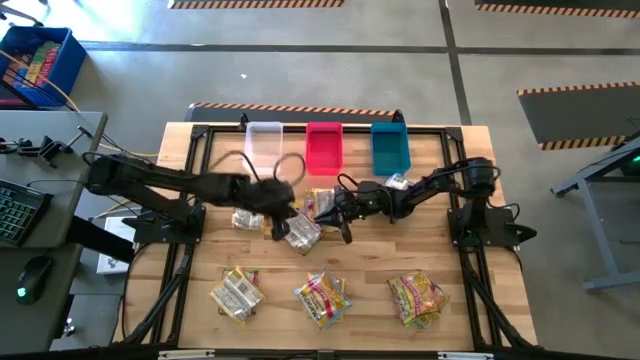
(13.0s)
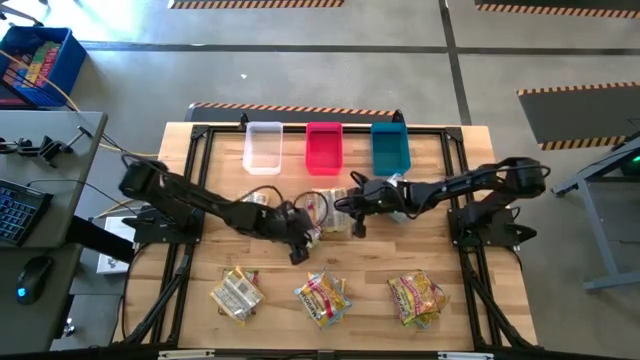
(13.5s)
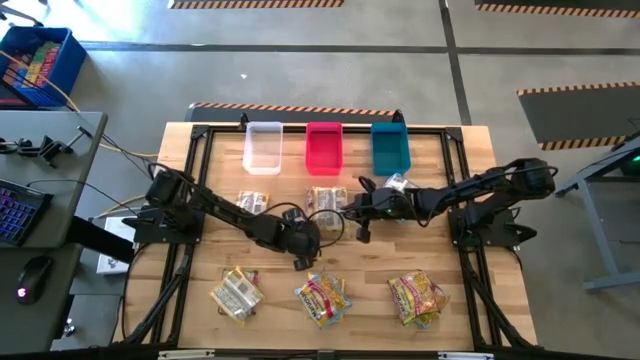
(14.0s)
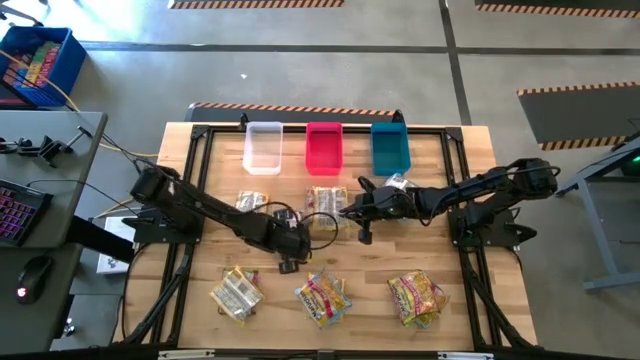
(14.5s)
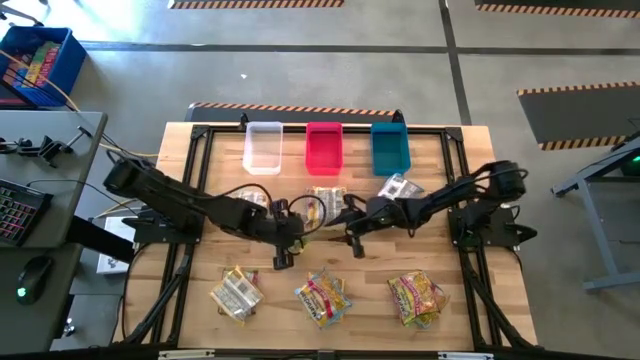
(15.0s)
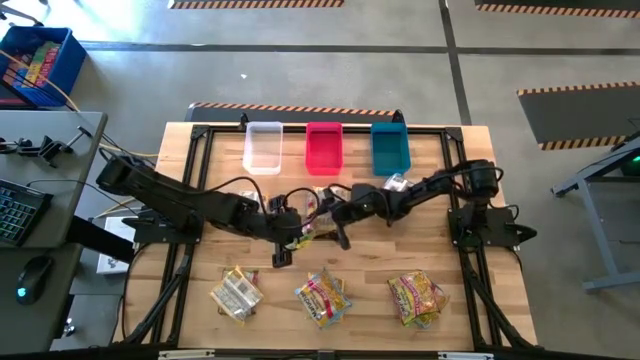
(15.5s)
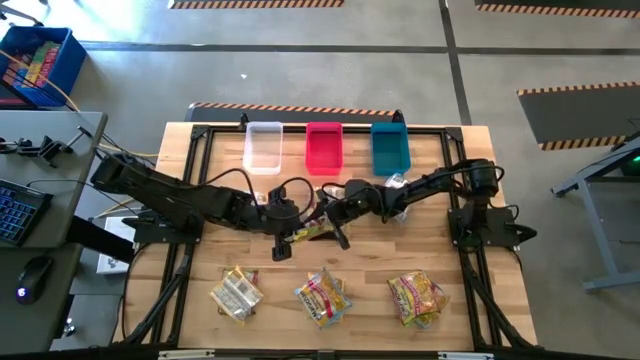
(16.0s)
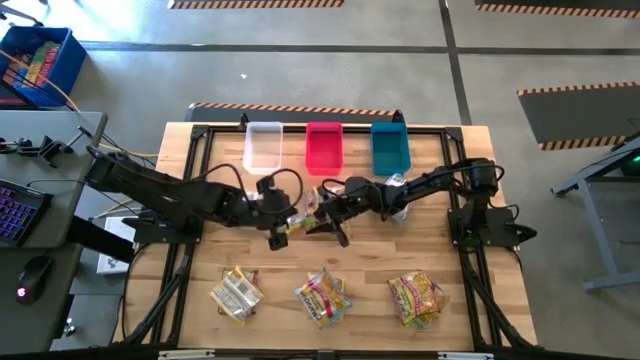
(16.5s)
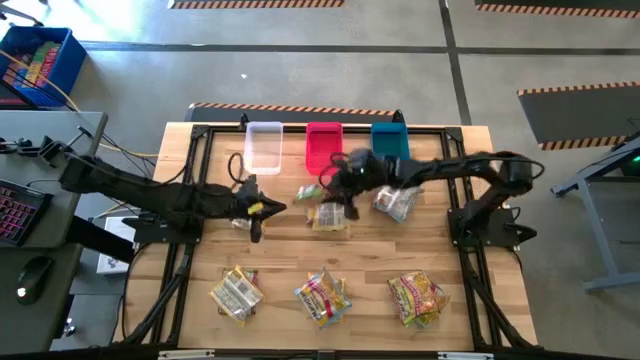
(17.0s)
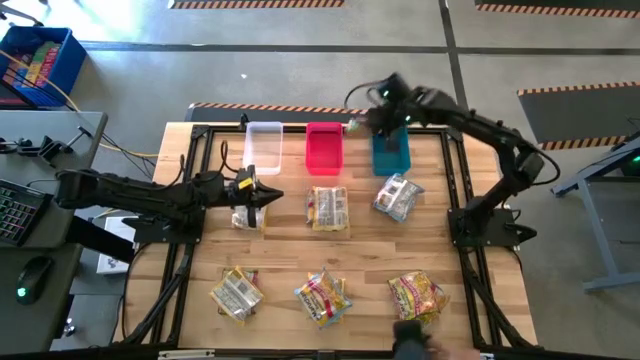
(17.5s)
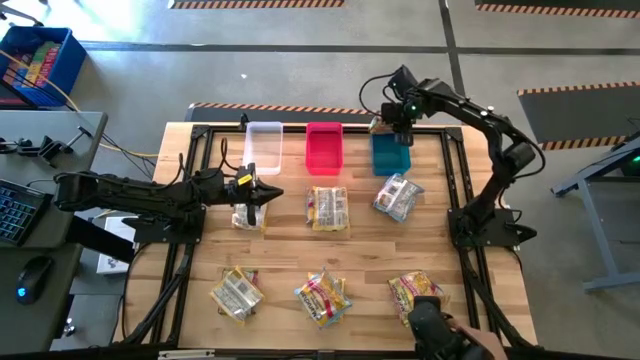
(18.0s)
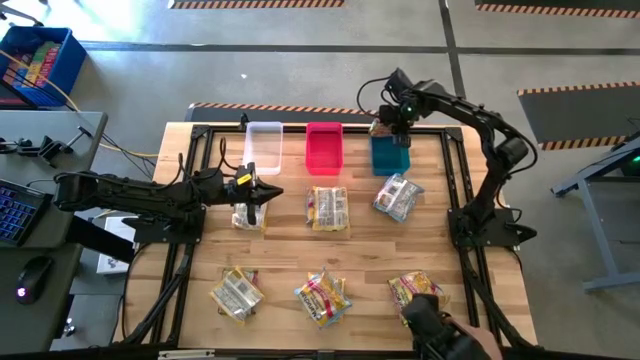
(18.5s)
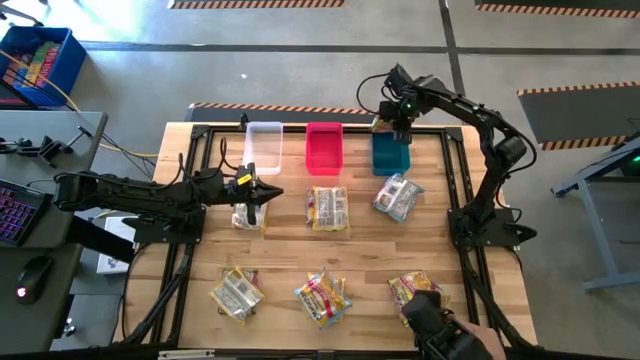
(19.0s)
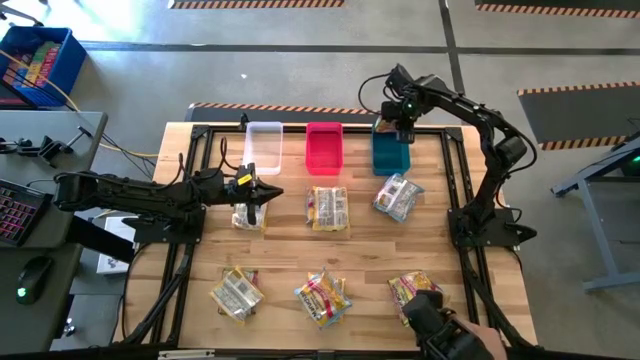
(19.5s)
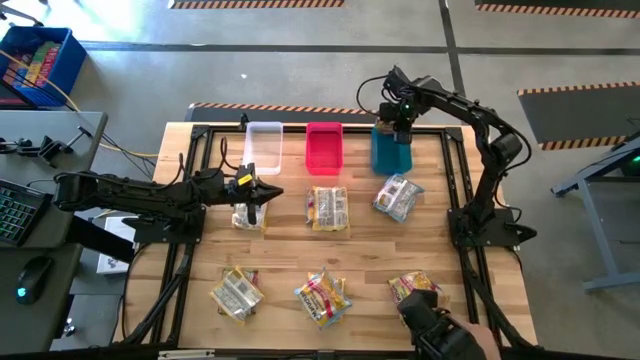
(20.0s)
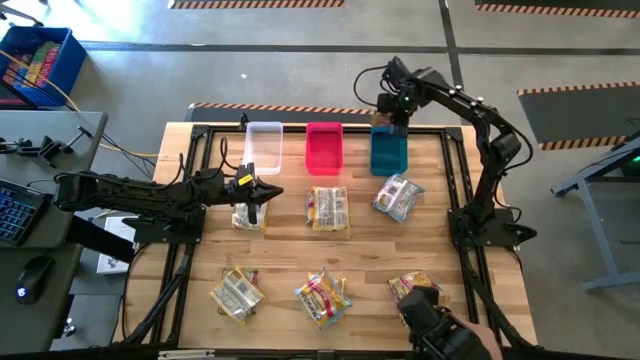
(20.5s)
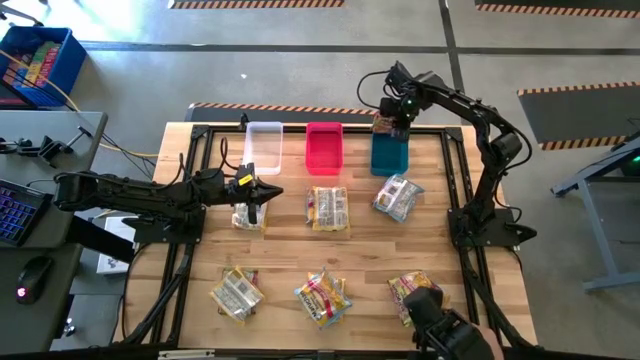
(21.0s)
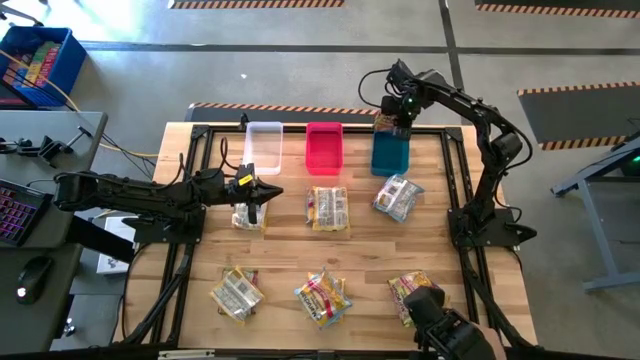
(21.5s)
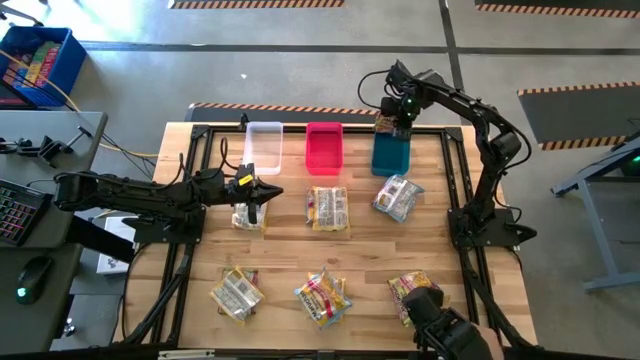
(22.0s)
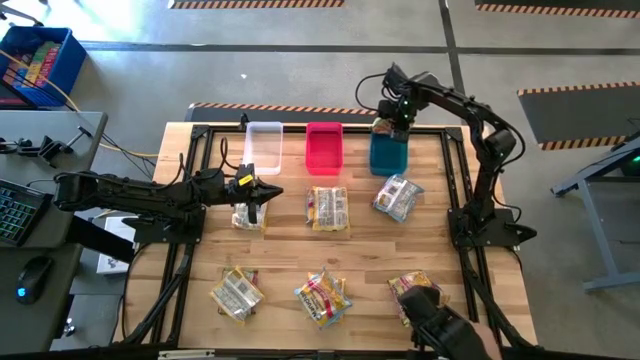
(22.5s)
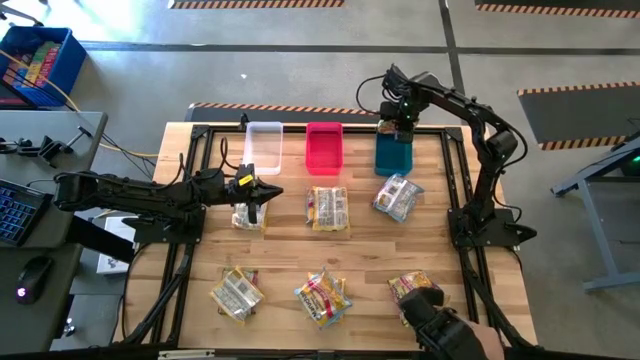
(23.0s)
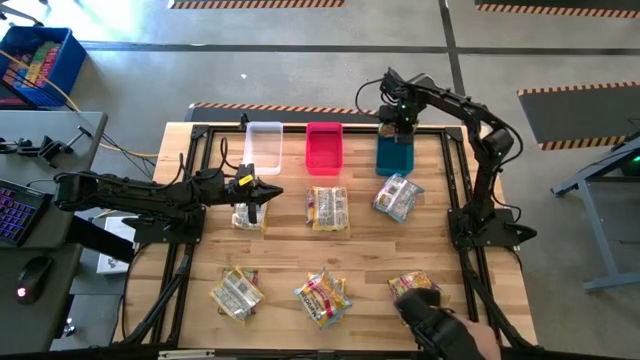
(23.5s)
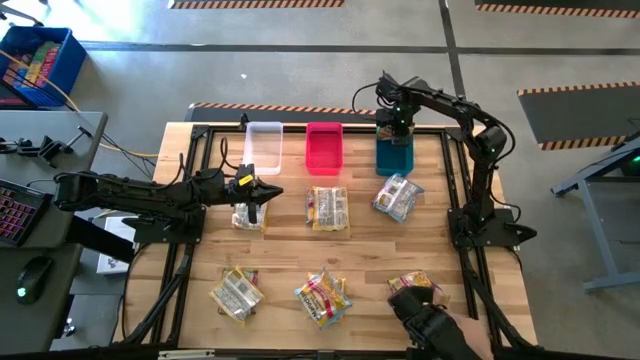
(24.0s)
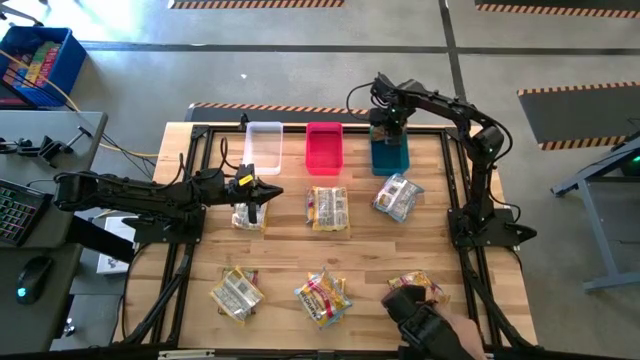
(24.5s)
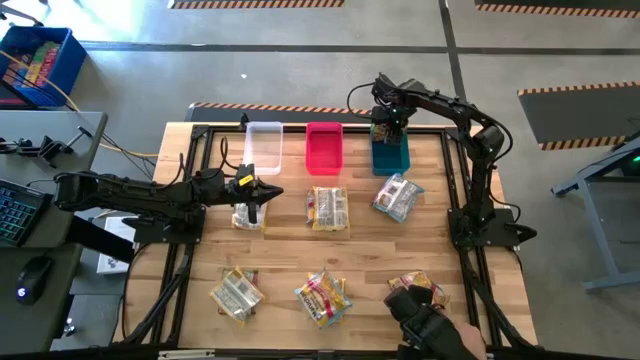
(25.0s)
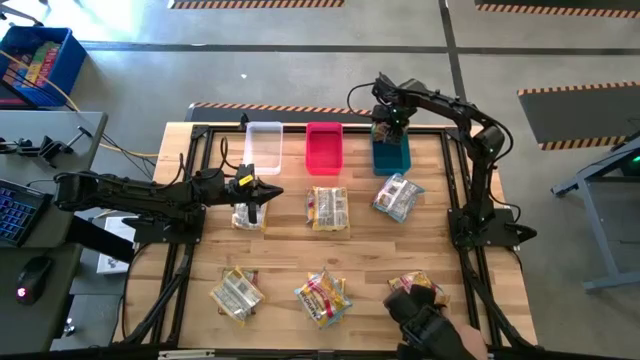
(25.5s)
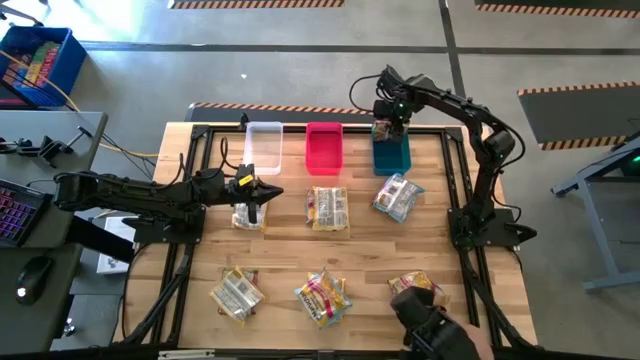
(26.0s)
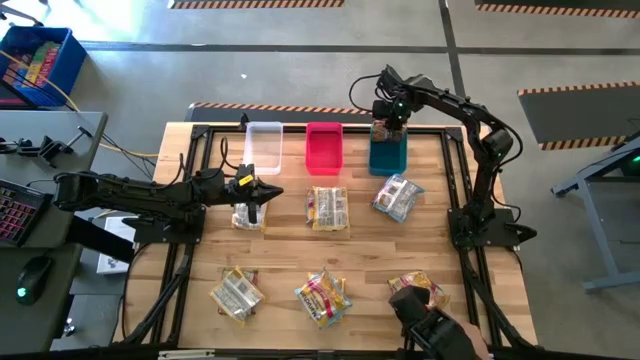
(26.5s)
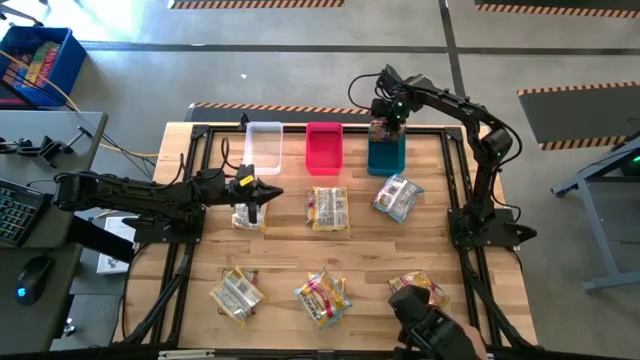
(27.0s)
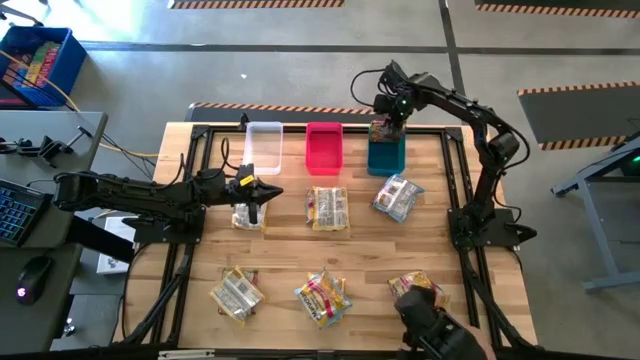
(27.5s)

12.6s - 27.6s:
Task: Sort Maruchan noodles
Put the green noodle pack into the blue bin

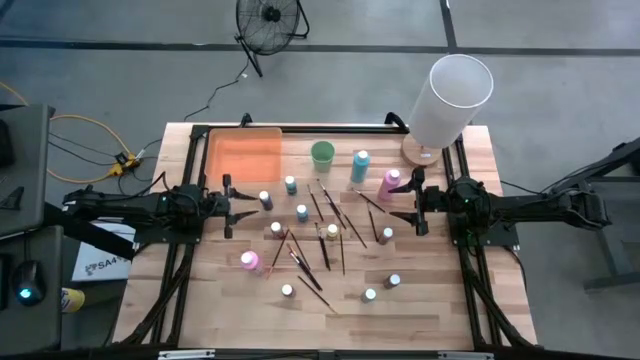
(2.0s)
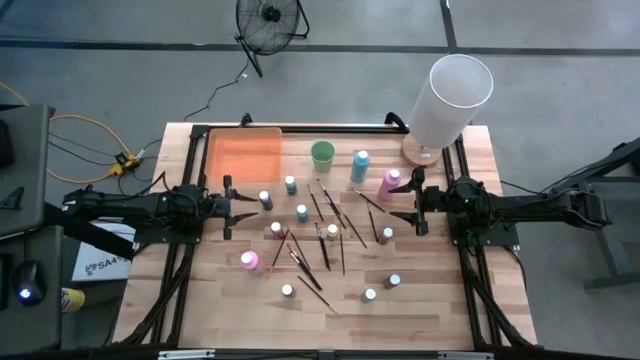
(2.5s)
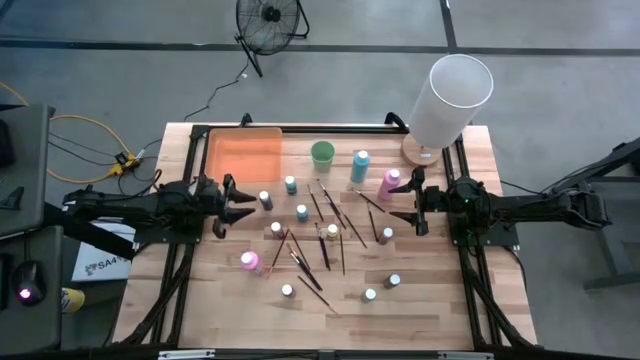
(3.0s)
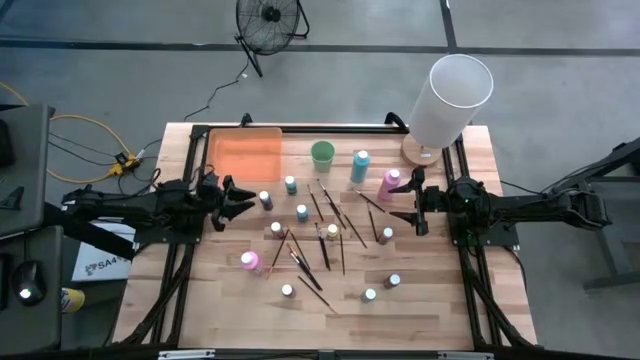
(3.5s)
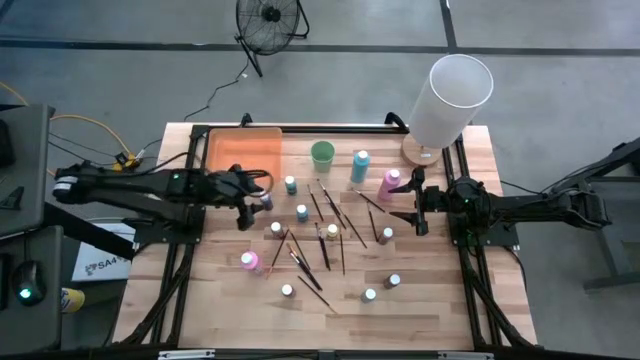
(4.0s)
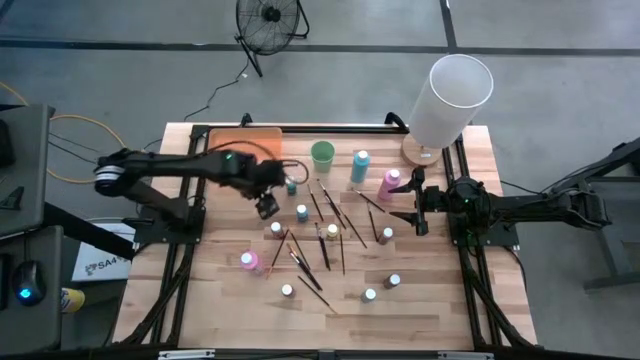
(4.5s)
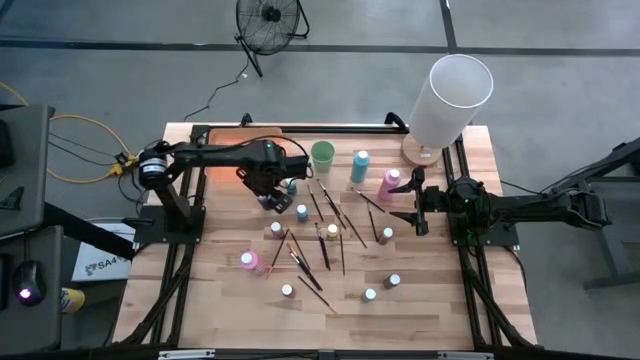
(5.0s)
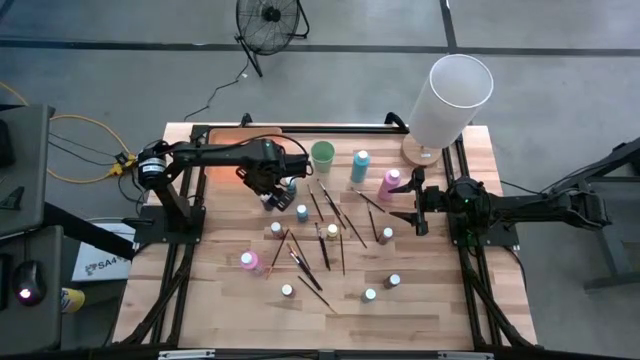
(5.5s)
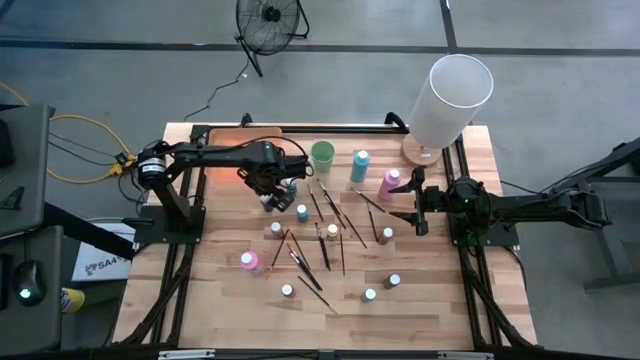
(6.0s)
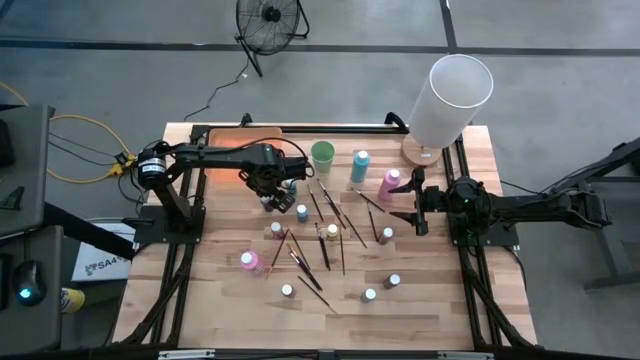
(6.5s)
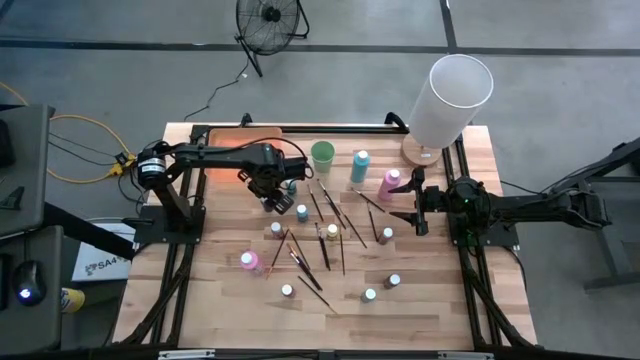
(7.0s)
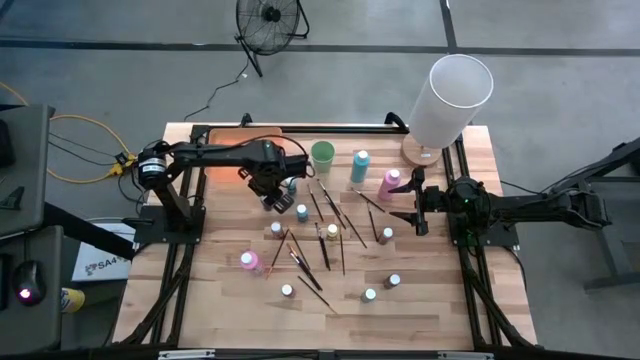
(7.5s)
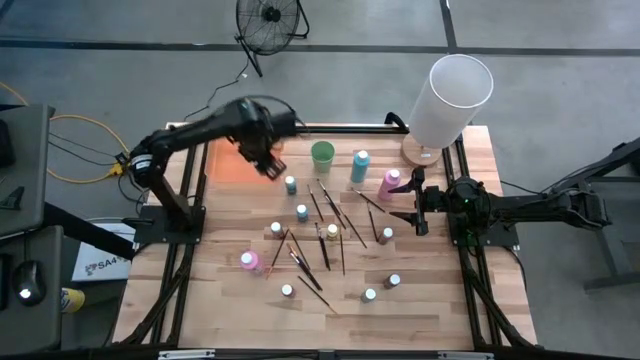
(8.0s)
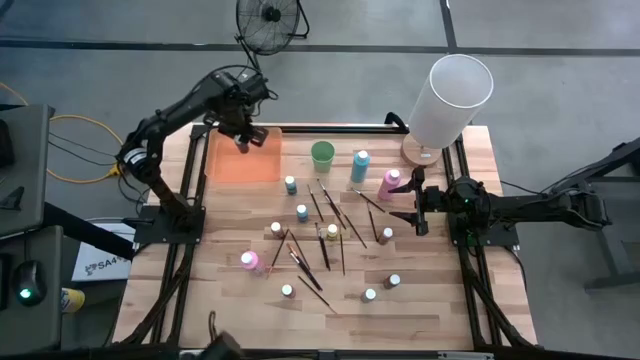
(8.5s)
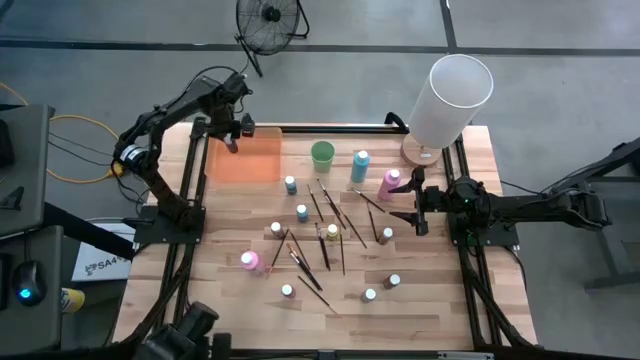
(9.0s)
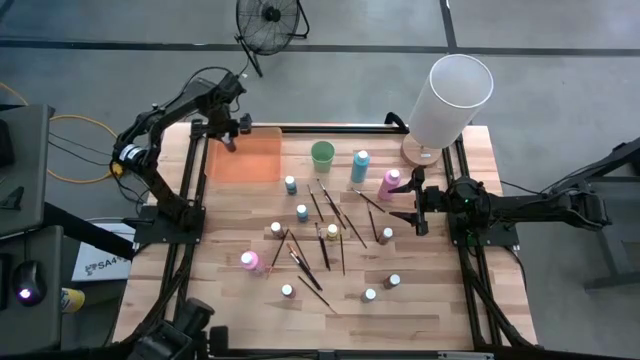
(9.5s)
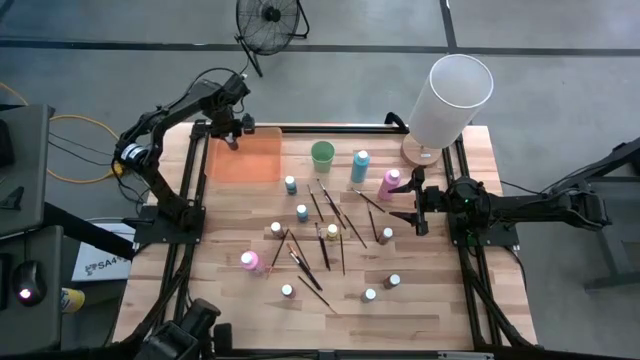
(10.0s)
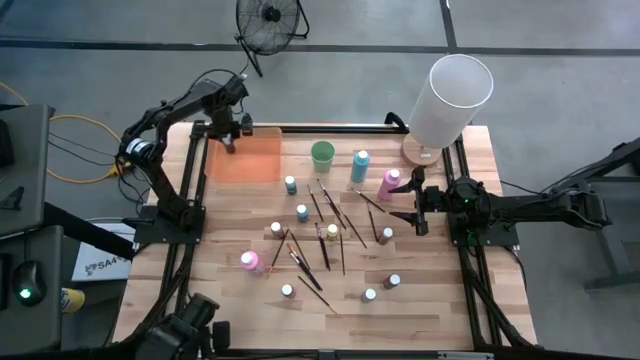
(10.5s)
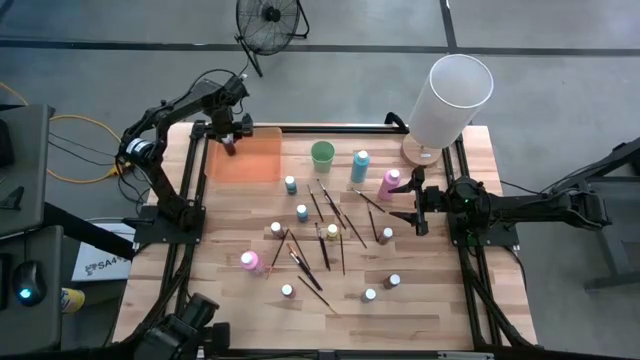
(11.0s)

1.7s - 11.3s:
Task: Pick & Place Paint Supplies
Put the dark blue paint bottle into the orange bin
